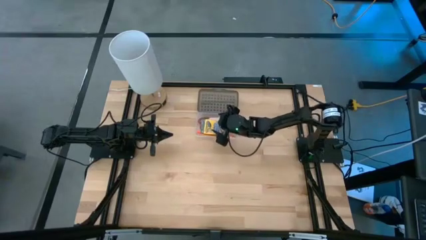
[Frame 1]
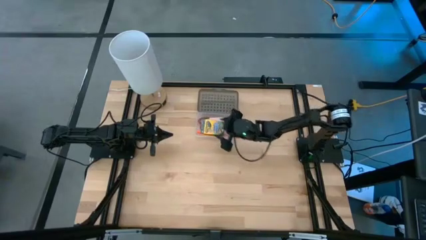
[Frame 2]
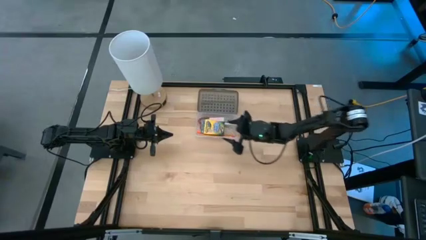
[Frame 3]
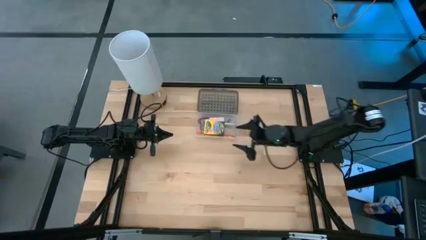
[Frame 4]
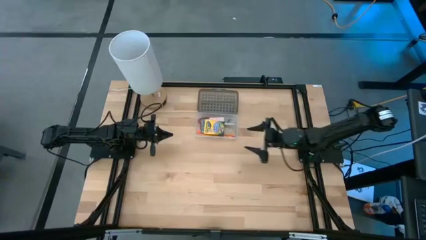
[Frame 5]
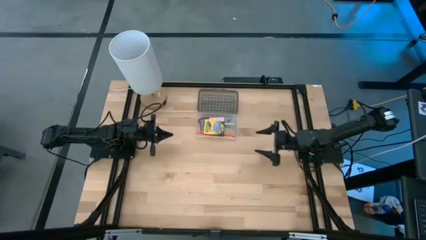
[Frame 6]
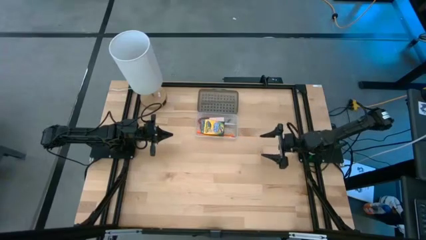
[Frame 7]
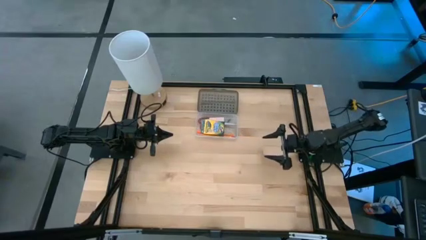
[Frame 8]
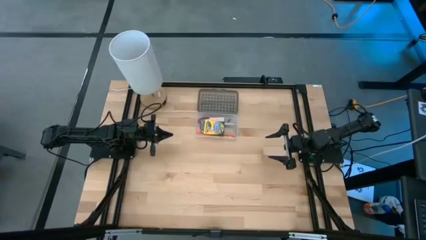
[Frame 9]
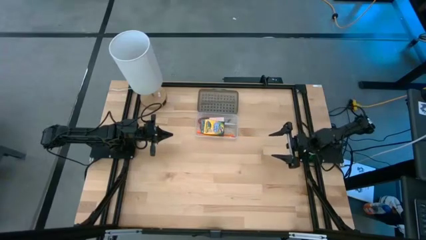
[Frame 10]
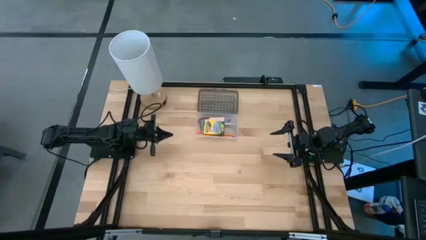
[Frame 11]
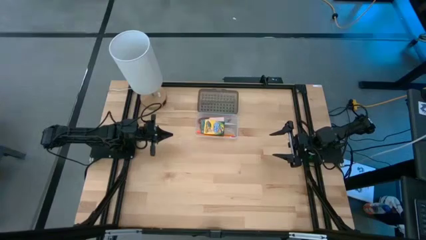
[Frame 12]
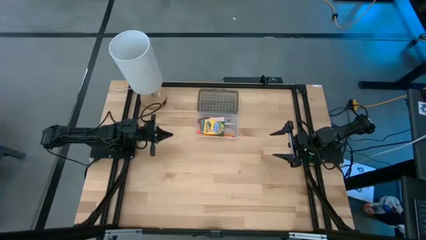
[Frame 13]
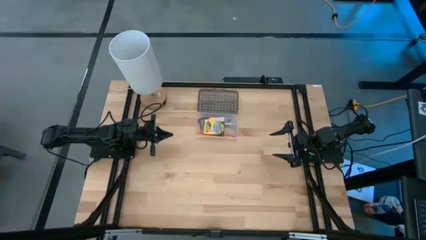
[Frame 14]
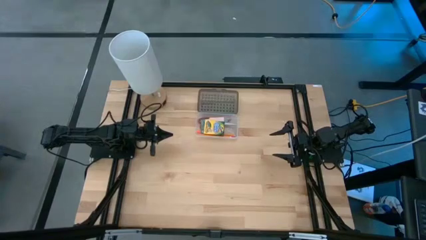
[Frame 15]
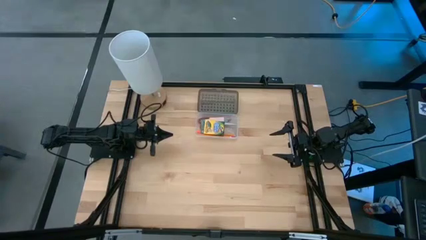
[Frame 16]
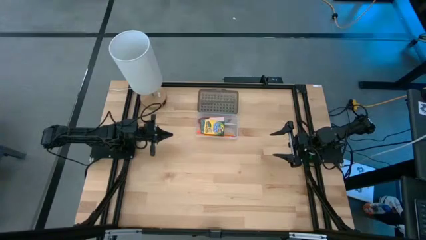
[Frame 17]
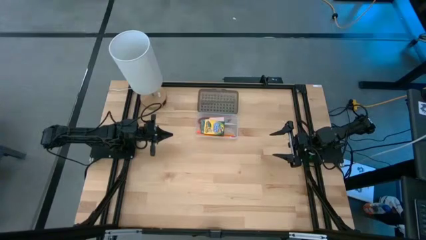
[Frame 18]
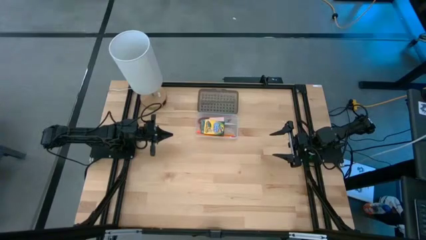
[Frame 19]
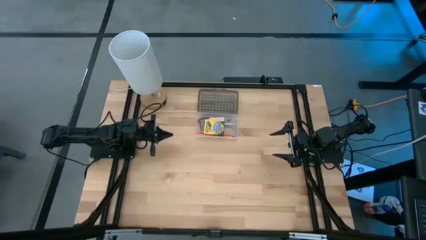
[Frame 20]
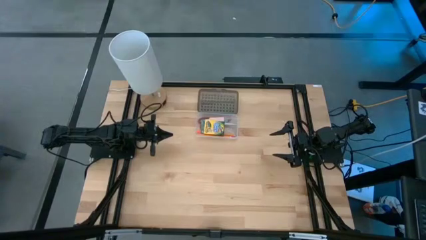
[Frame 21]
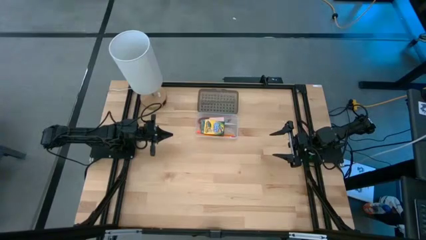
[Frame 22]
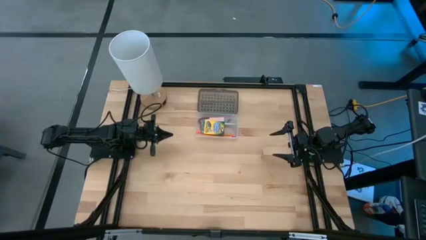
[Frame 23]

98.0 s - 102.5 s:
Task: Pack school essentials
Return to Home Position

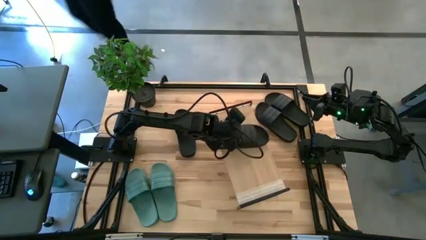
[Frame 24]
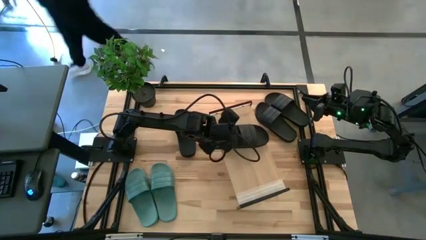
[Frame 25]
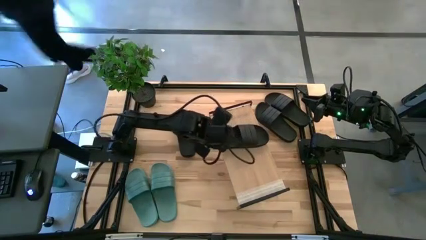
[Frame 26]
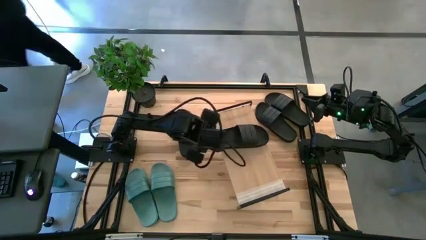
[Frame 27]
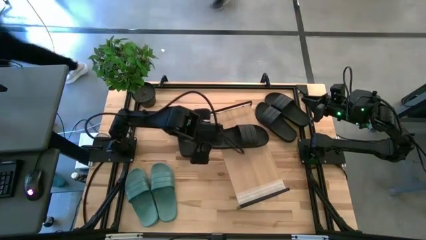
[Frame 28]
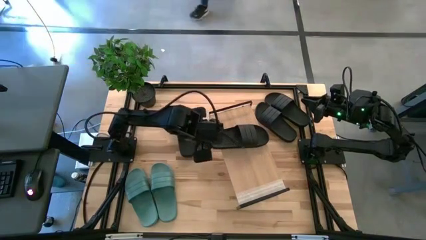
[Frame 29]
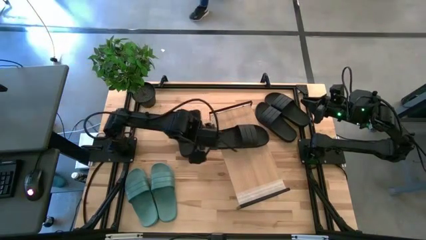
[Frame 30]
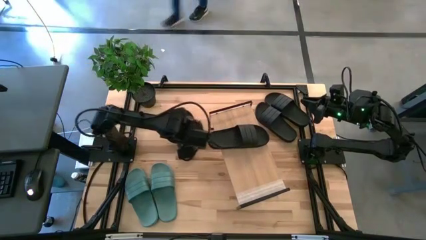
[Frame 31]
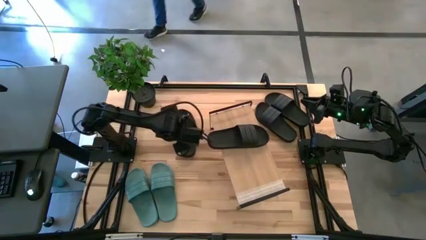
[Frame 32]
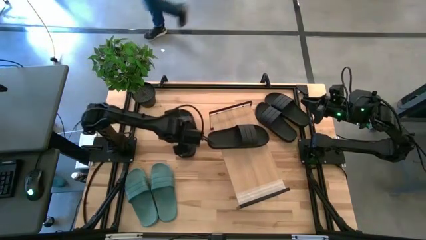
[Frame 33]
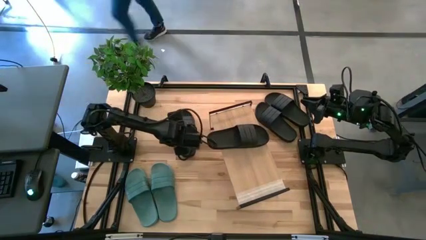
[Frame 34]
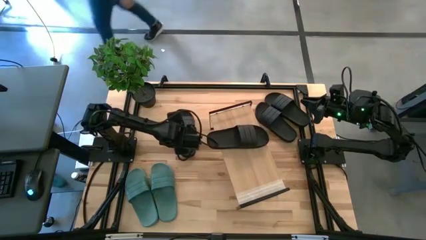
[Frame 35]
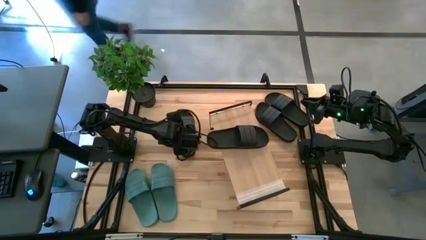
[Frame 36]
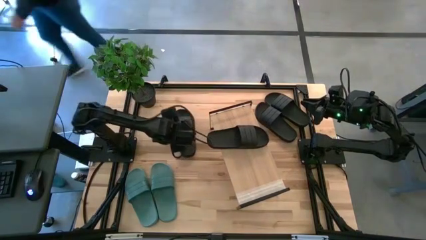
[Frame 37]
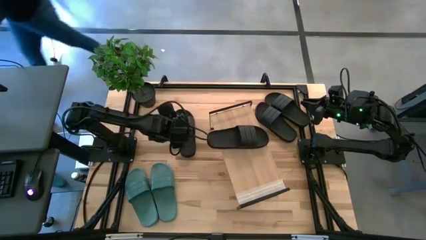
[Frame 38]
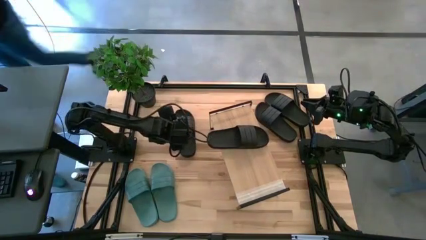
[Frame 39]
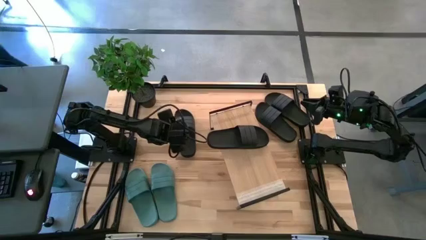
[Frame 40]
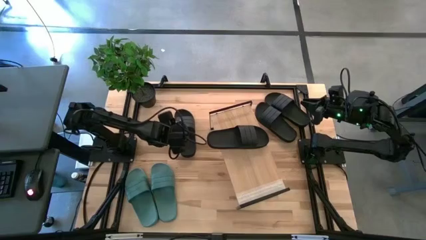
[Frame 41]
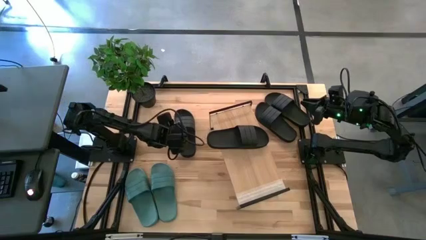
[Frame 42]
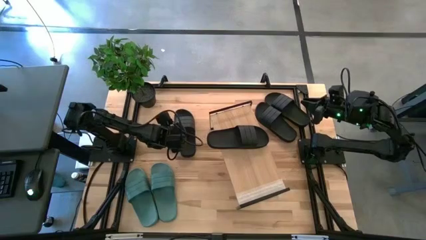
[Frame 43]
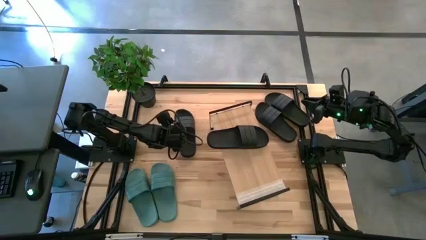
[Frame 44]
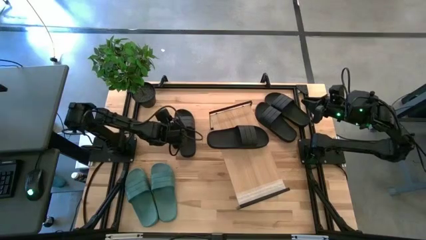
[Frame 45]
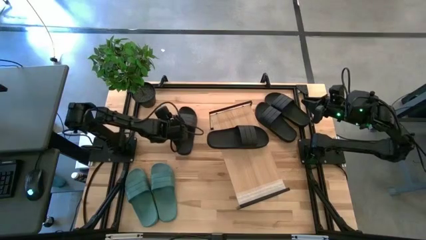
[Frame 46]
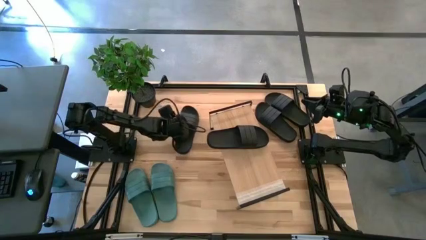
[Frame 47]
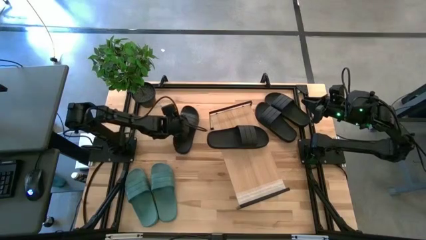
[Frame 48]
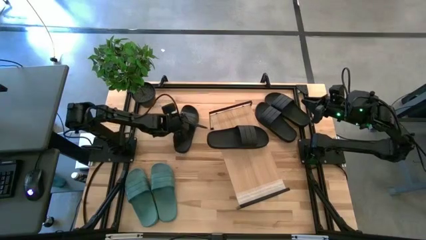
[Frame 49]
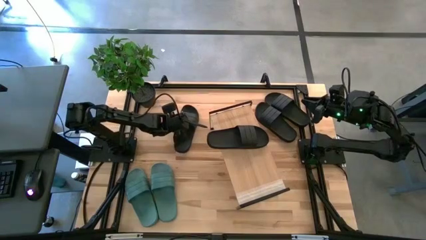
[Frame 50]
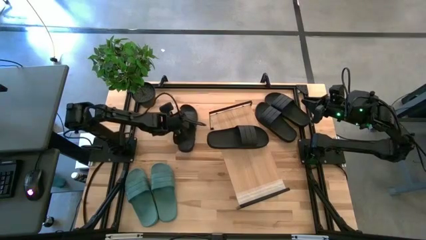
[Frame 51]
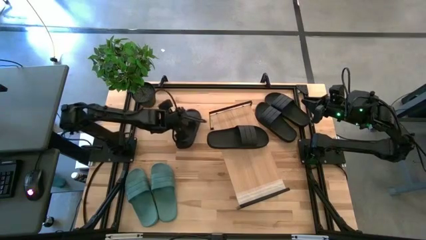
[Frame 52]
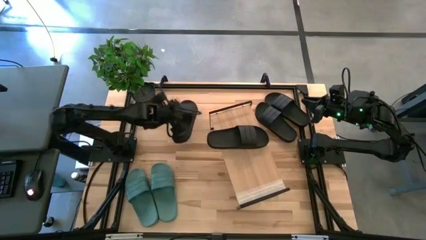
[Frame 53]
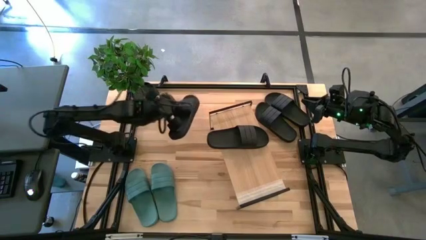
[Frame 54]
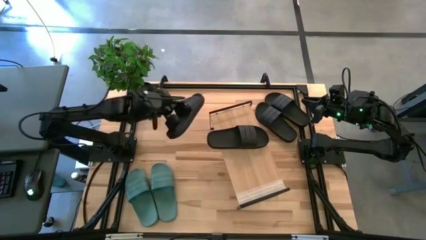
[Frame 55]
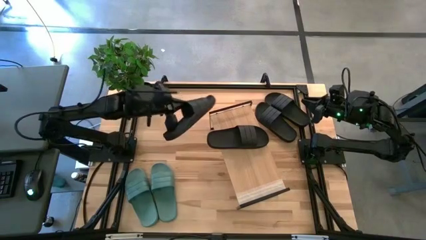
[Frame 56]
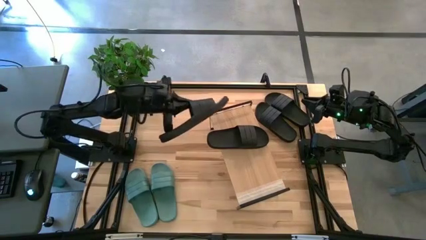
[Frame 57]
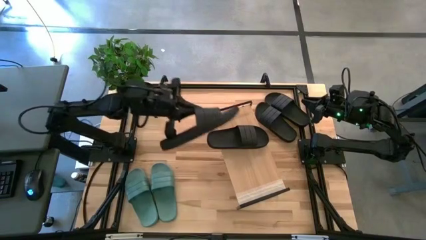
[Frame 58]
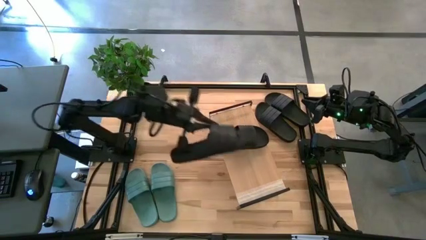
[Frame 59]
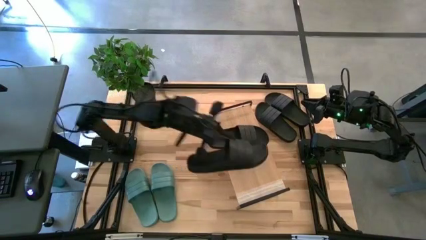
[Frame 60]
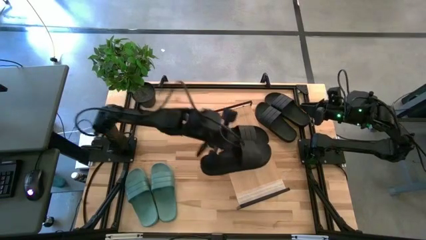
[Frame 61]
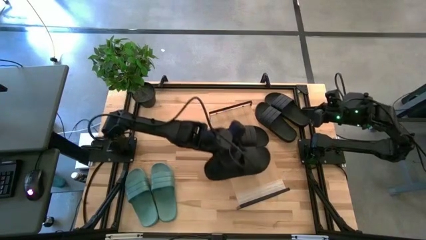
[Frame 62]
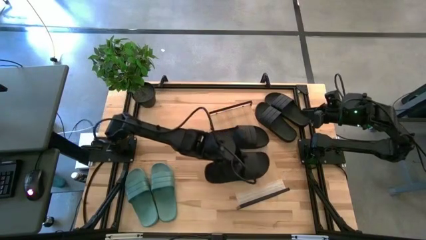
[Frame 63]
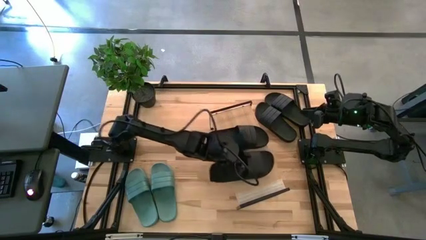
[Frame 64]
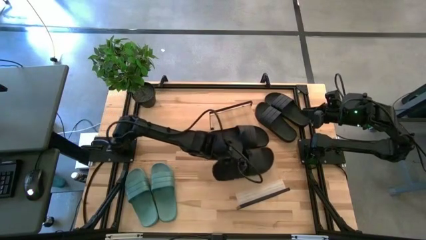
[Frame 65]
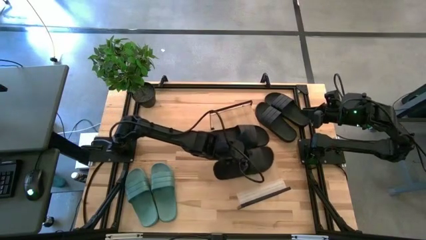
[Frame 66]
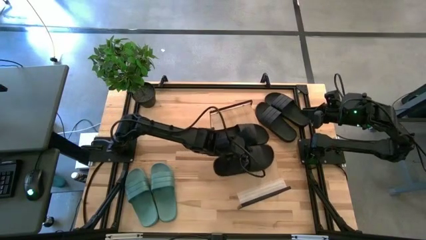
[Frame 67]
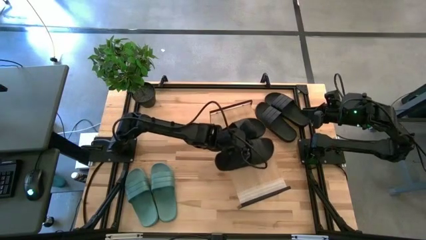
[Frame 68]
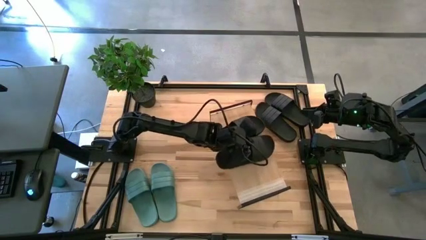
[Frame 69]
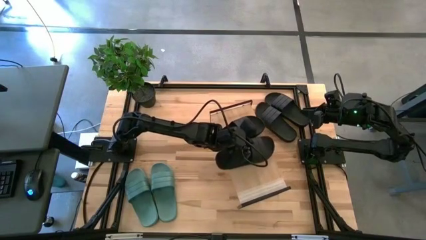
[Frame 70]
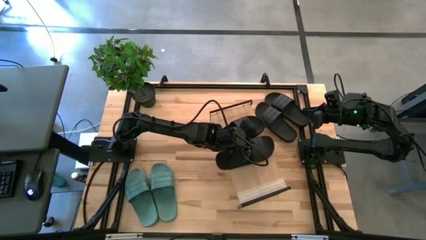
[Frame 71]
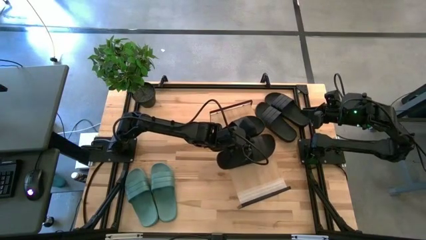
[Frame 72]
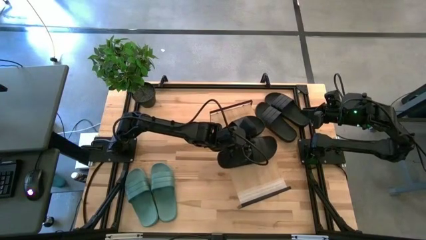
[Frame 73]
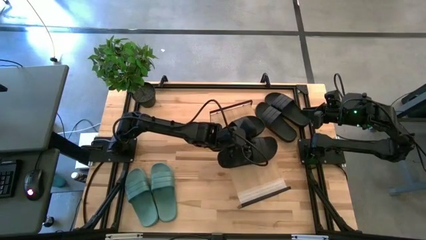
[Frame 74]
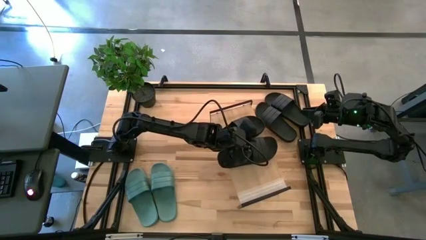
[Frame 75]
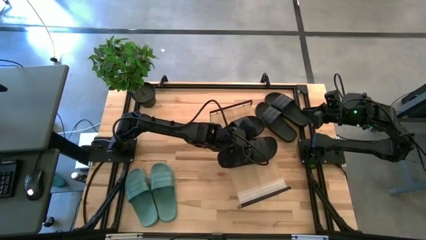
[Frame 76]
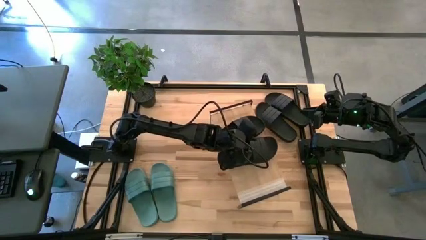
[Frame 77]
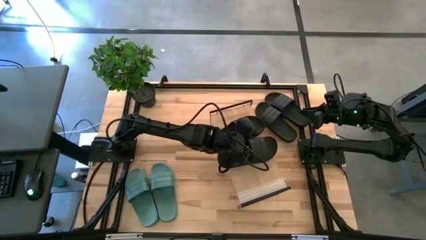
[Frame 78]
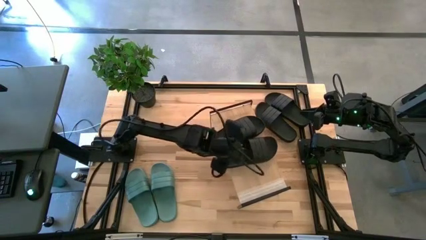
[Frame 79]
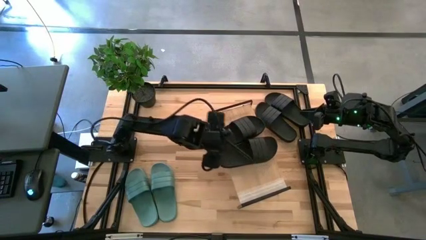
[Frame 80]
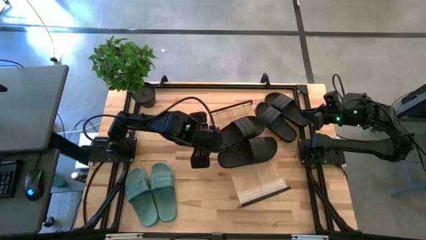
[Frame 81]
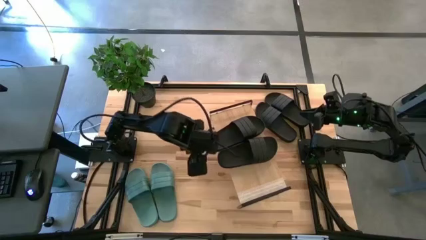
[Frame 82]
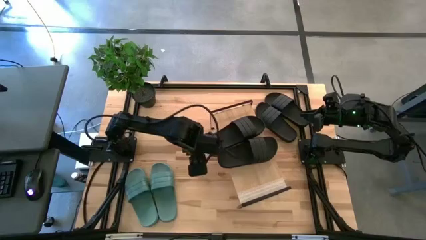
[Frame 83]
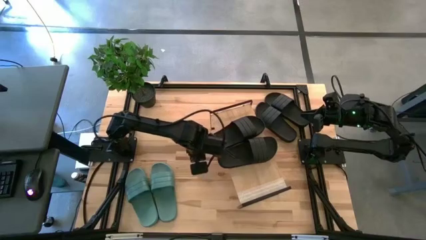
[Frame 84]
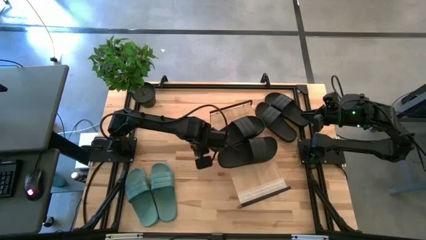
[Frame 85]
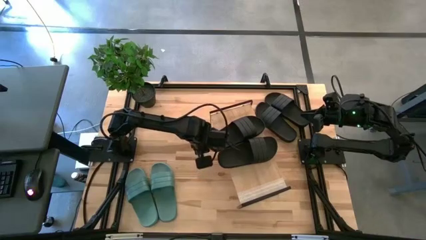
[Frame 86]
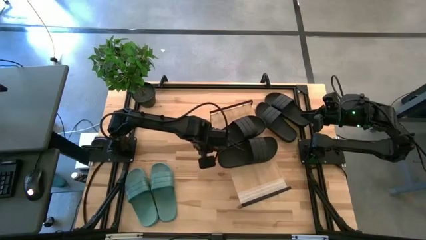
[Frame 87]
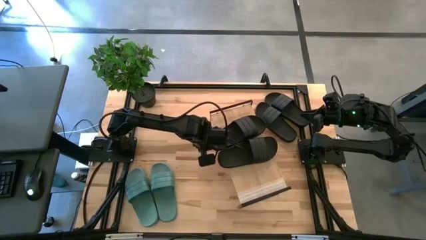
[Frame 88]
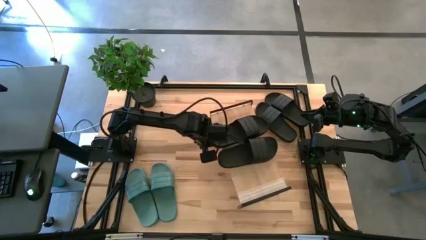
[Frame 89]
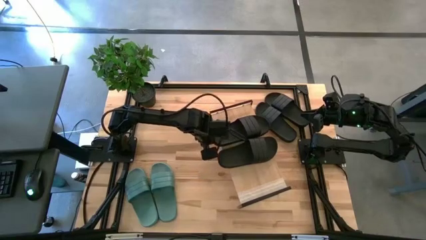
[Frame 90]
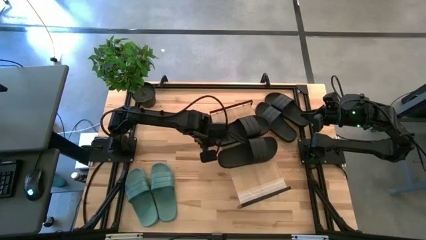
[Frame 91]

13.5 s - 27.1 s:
Task: Pick and place slides into the shelf
Put the black slides on the shelf
